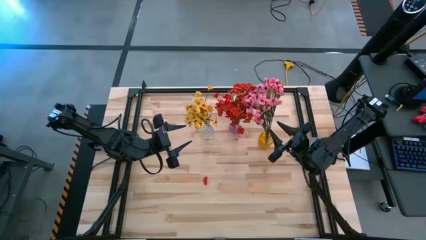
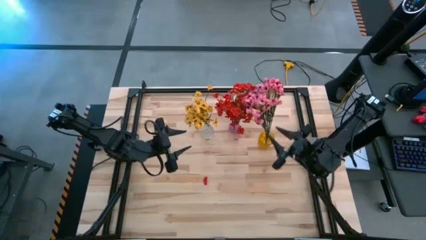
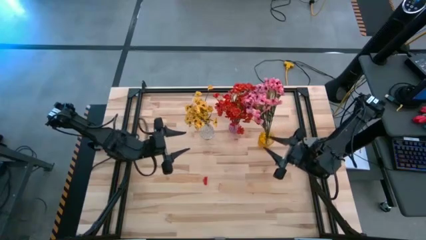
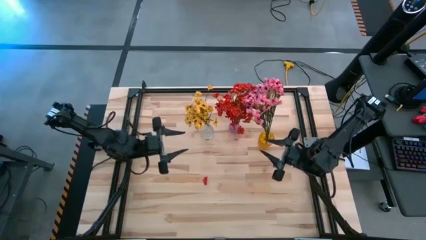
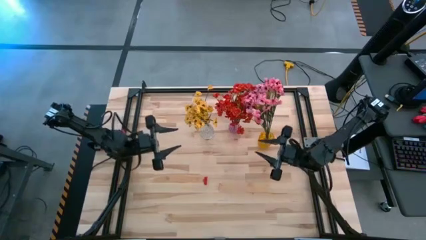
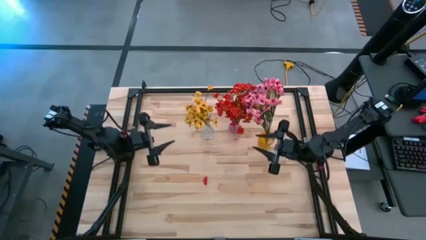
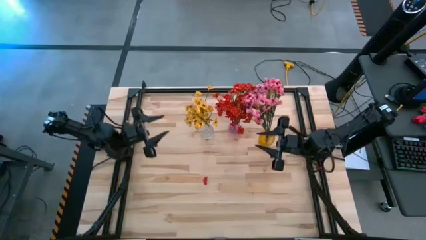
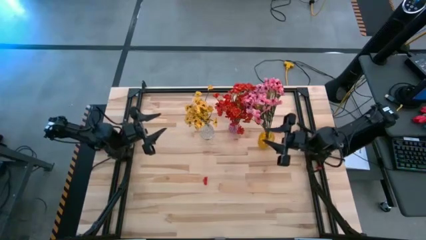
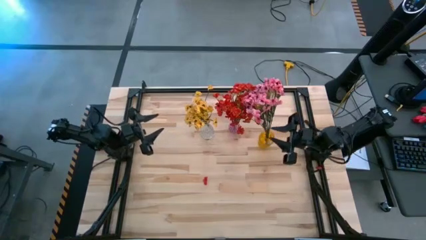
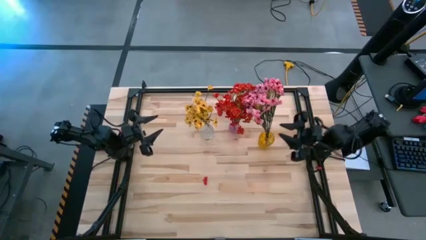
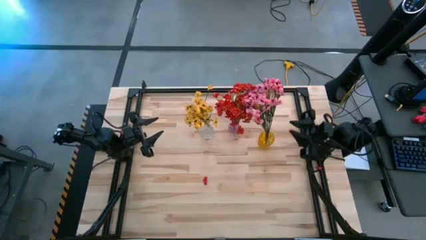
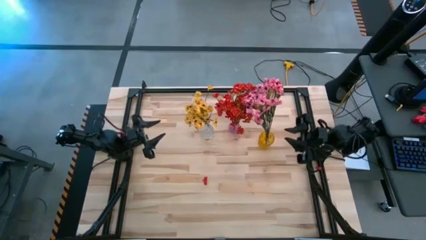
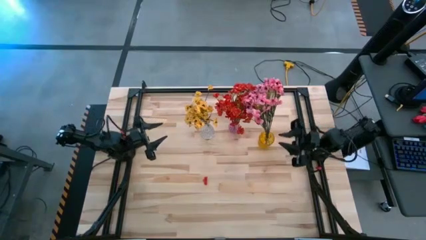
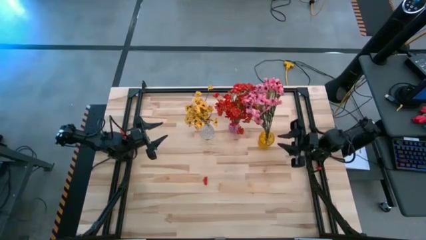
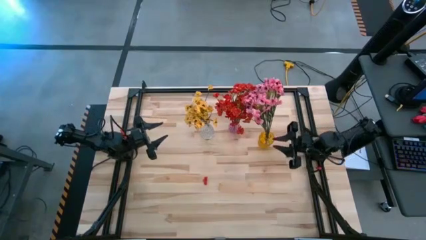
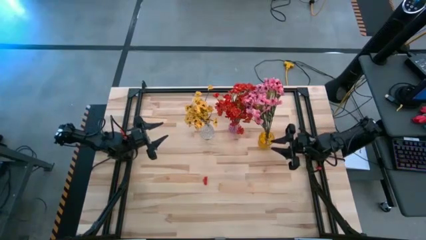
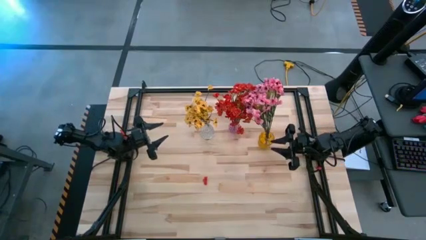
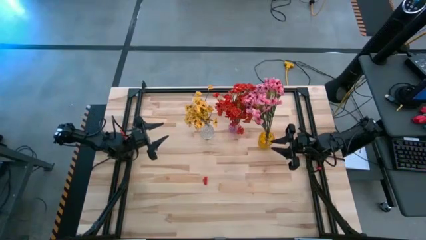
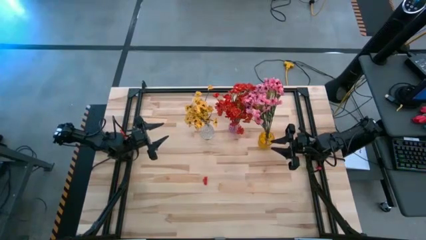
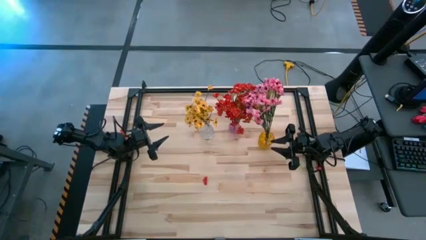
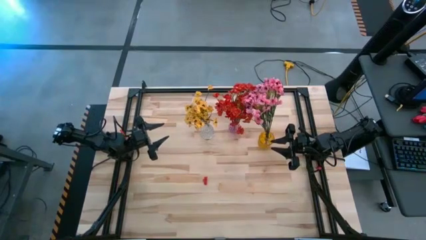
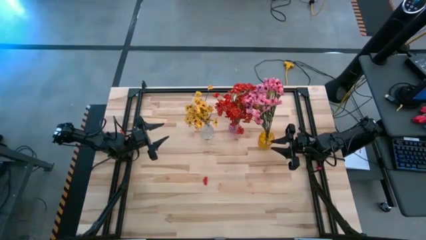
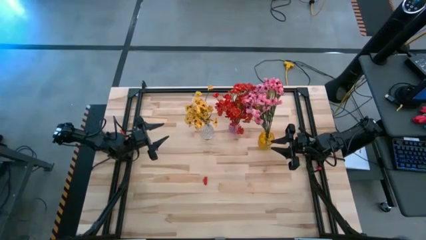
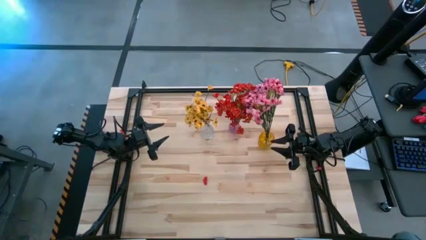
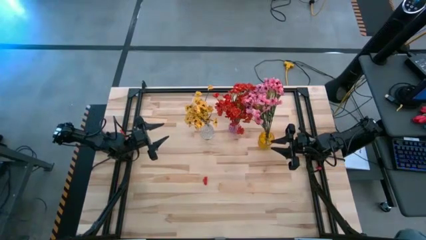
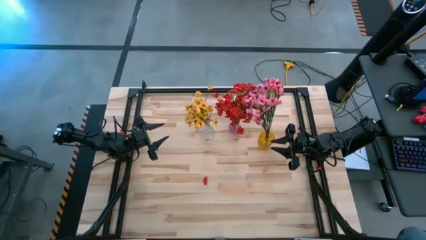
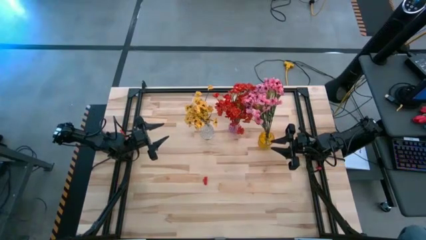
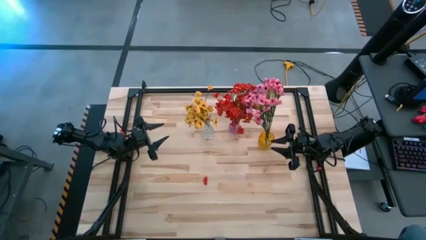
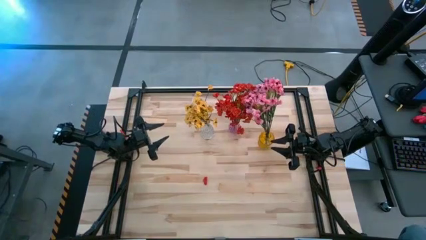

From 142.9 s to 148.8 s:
Task: Sort flowers into vase by color
Return to Home Position

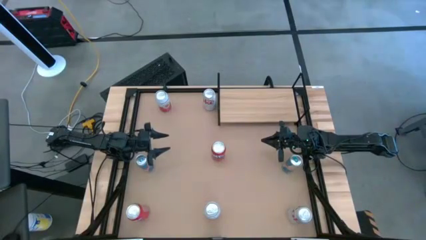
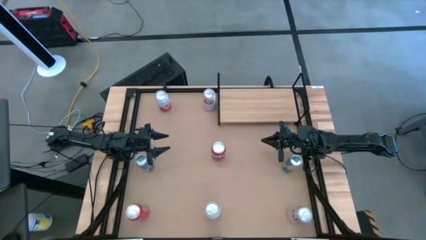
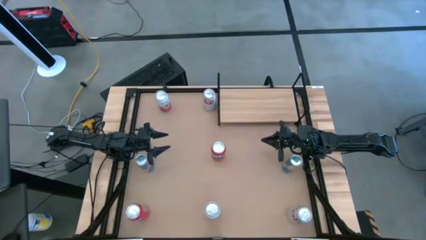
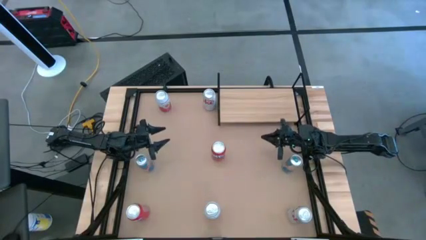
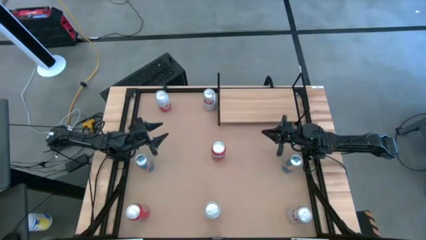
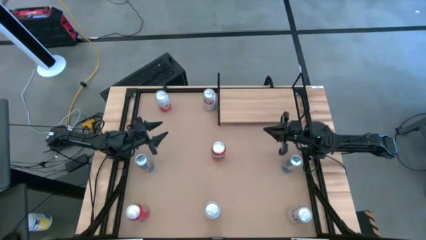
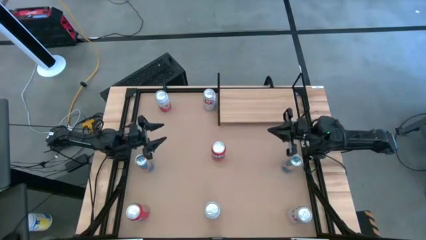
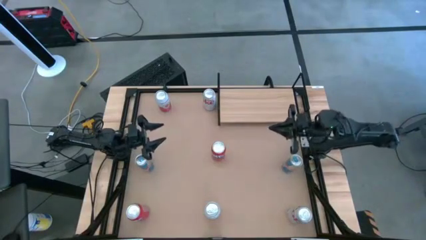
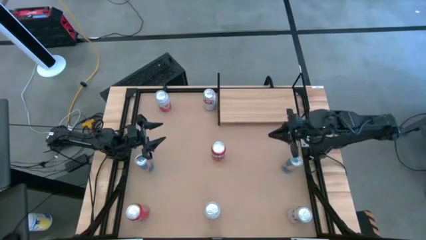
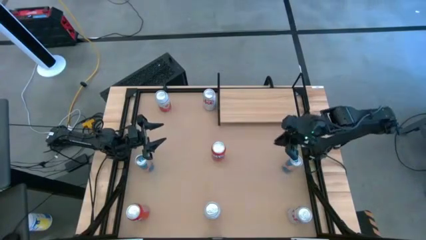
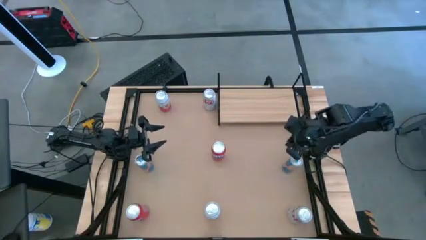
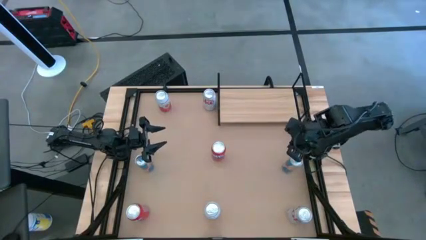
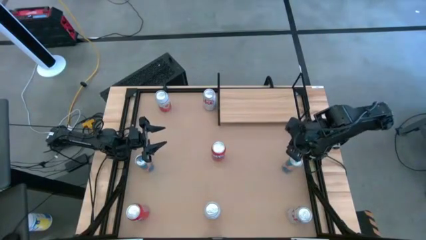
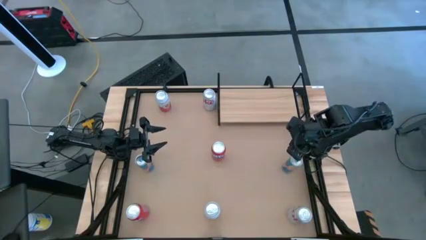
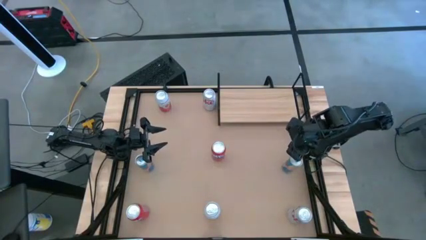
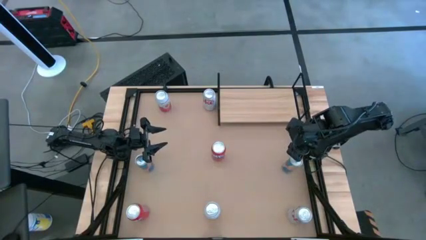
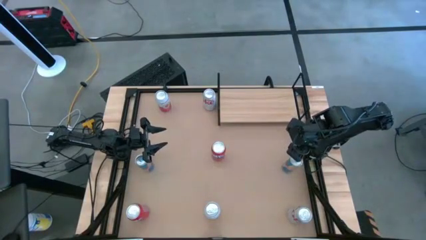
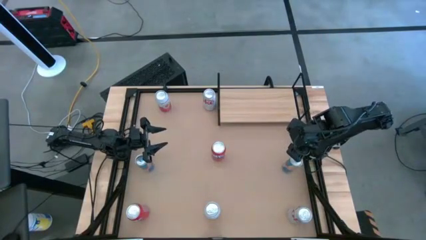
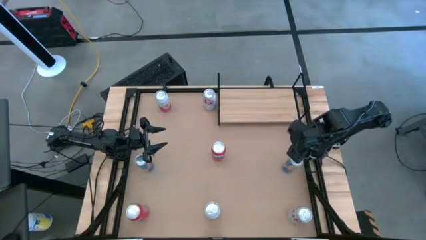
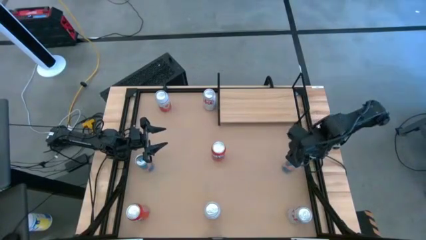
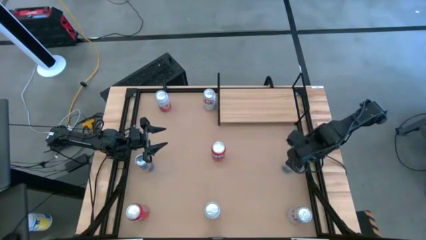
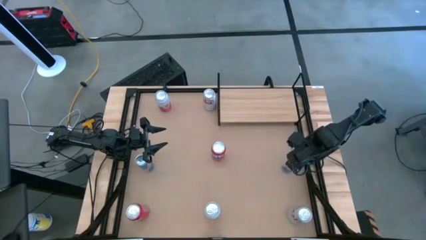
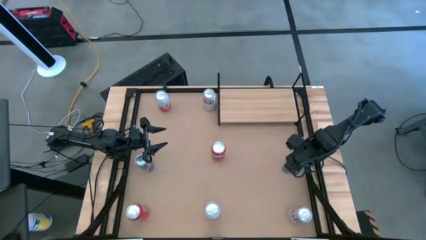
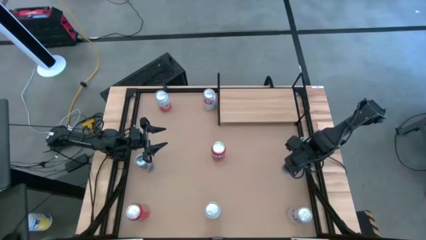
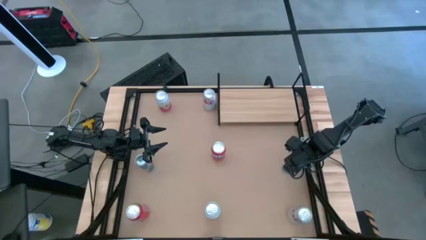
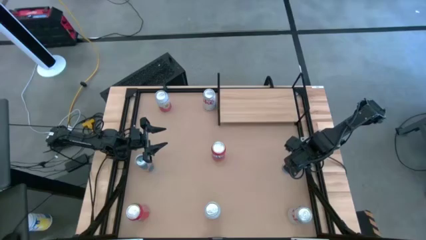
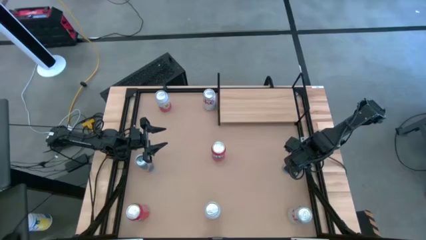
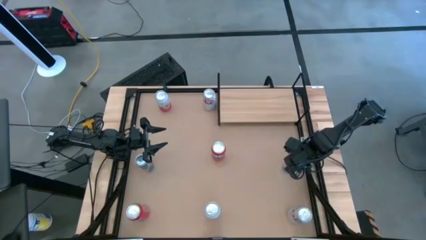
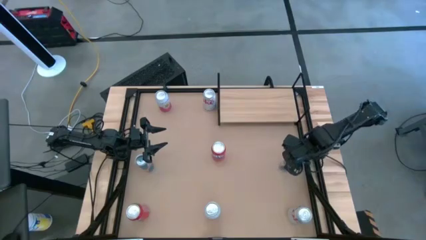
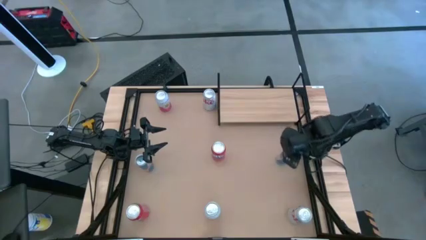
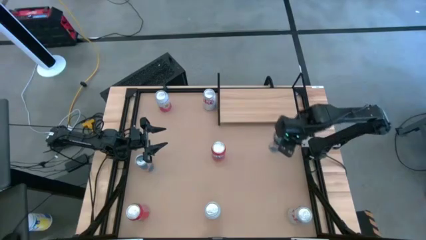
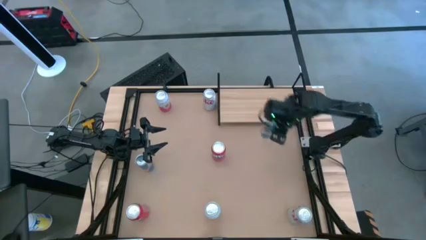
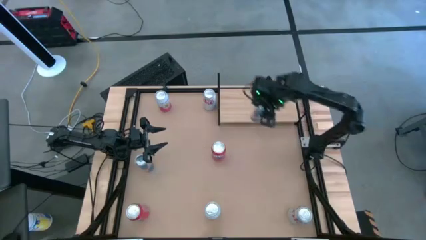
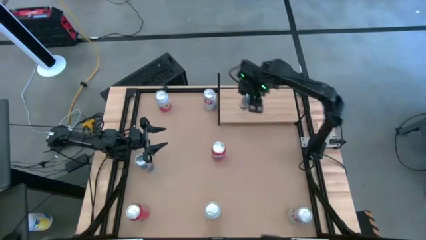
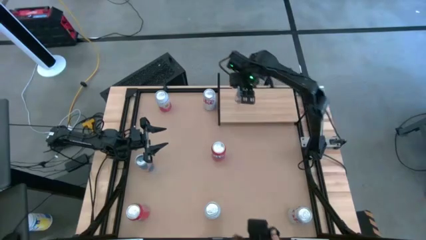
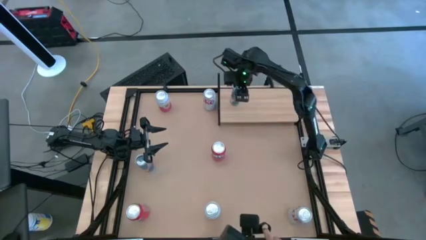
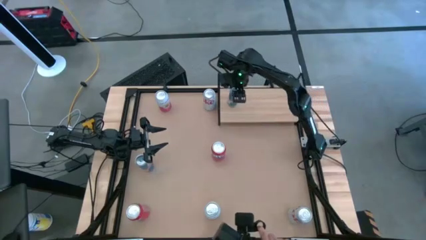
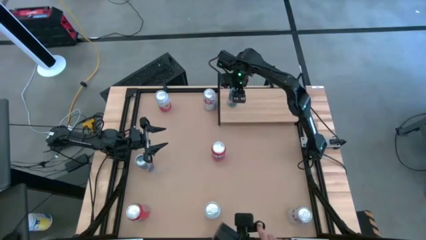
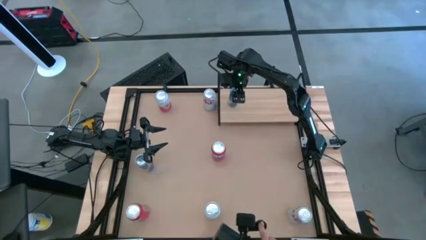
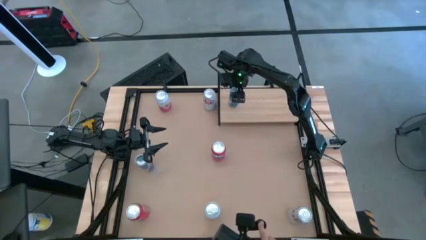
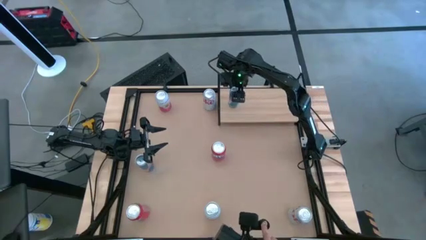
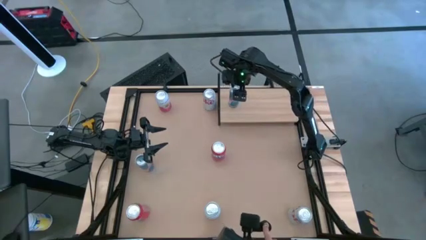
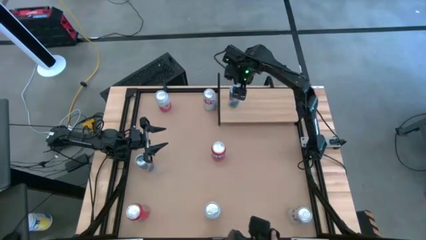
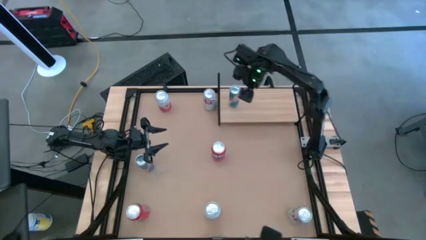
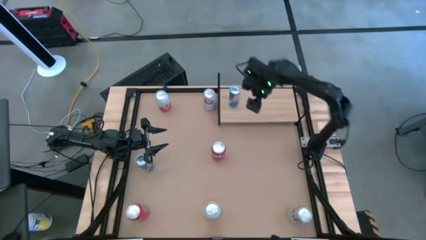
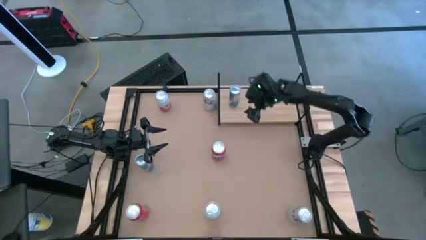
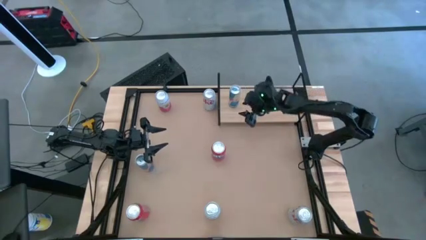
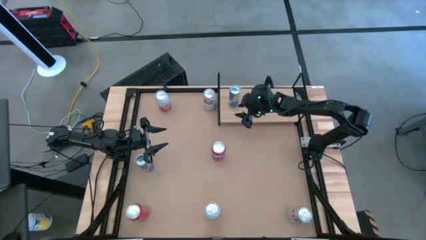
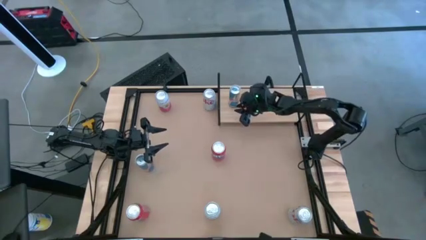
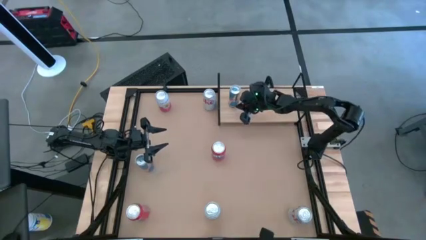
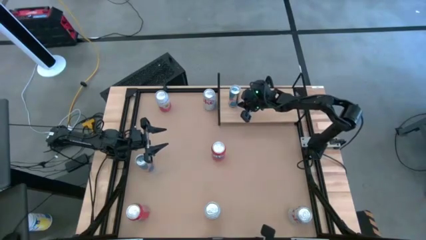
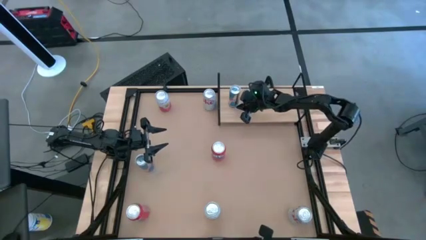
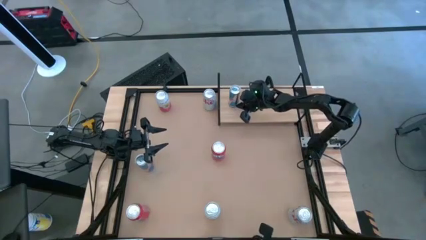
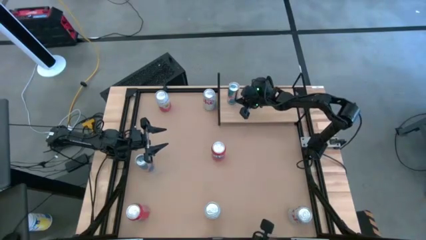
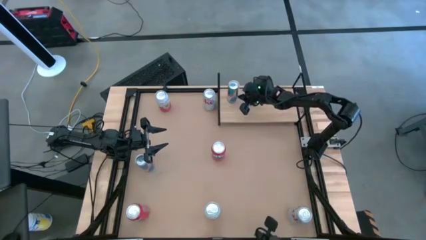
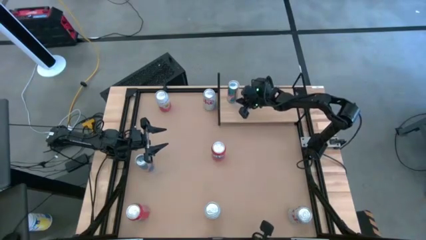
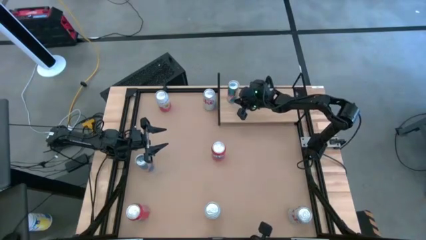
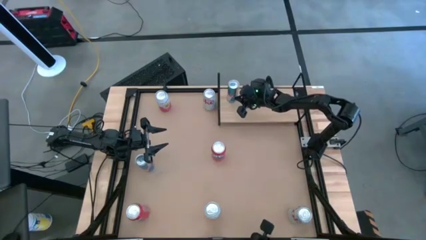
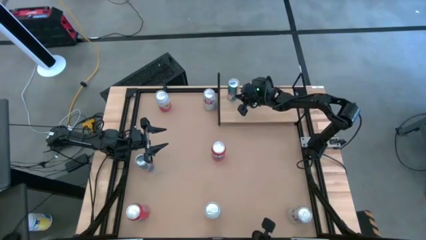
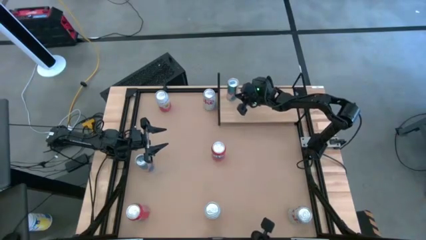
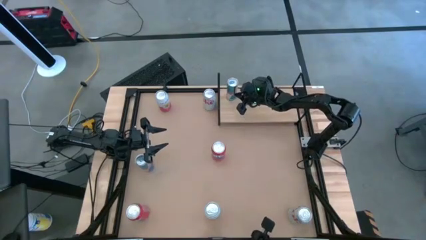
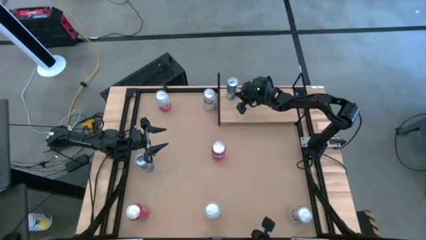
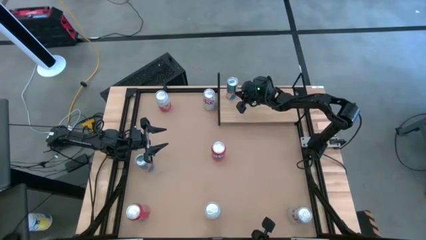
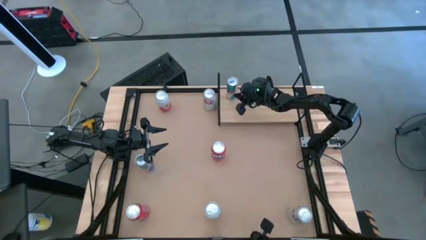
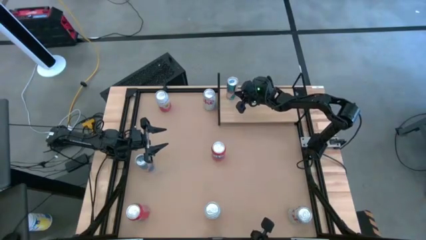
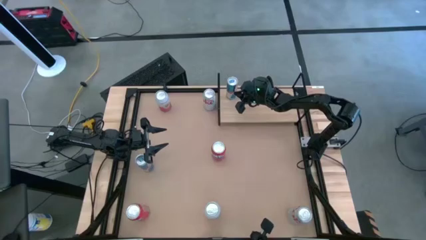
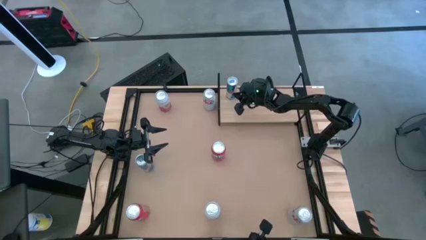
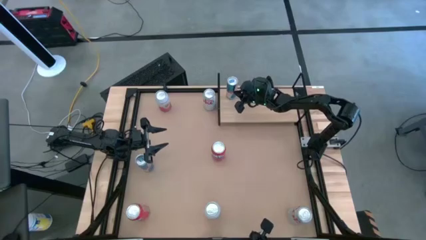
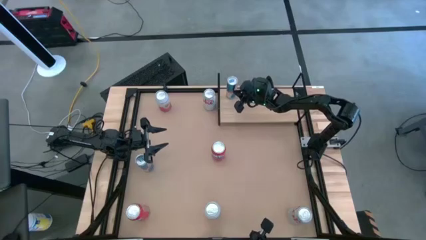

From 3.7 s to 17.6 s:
Task: Place canned beverage on shelf
Put the right white and blue soda can on the shelf
